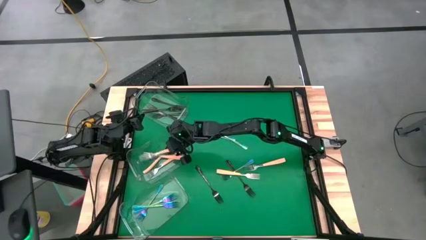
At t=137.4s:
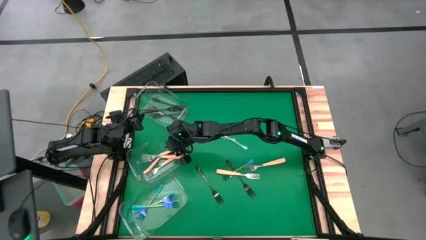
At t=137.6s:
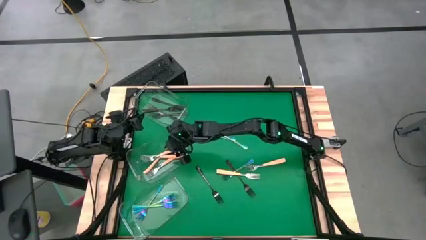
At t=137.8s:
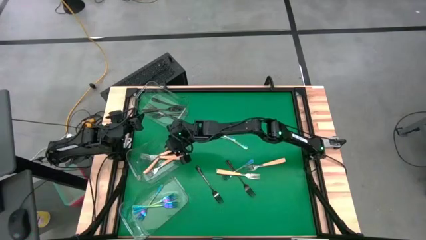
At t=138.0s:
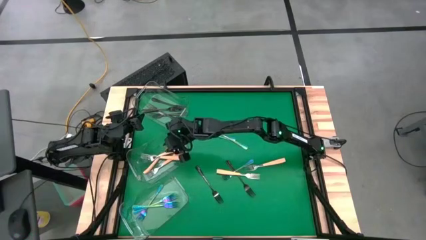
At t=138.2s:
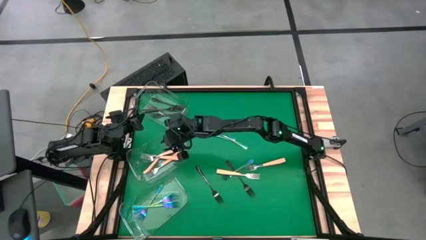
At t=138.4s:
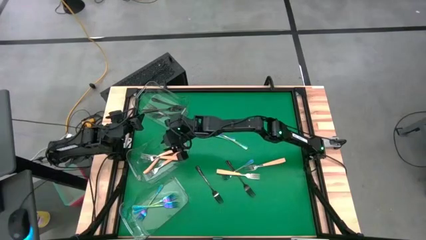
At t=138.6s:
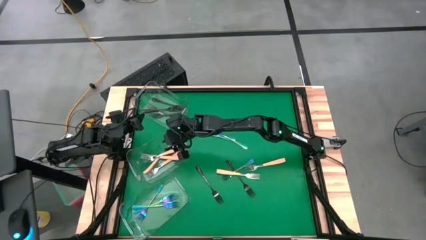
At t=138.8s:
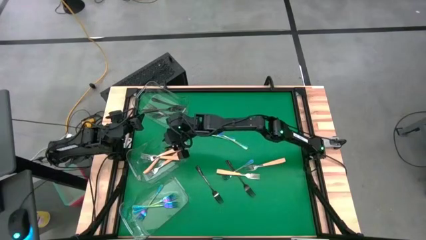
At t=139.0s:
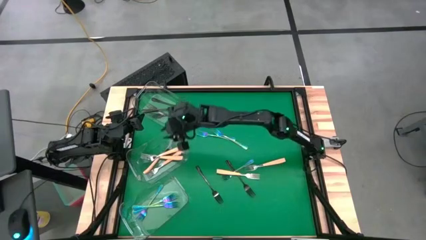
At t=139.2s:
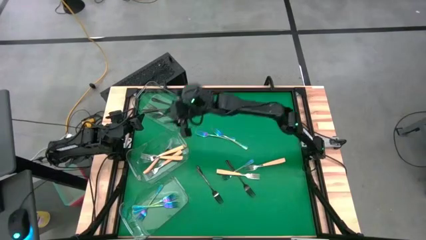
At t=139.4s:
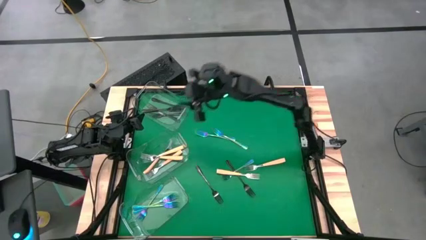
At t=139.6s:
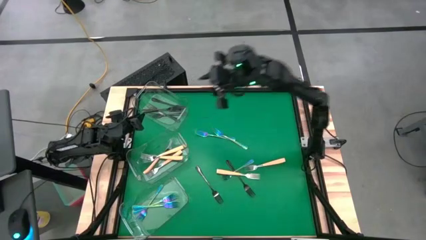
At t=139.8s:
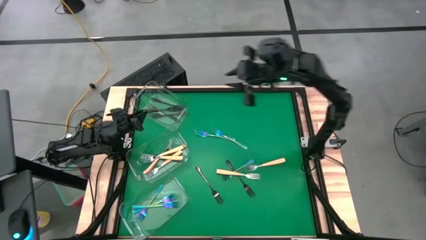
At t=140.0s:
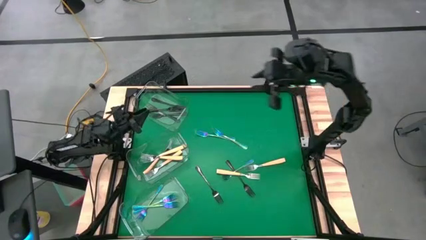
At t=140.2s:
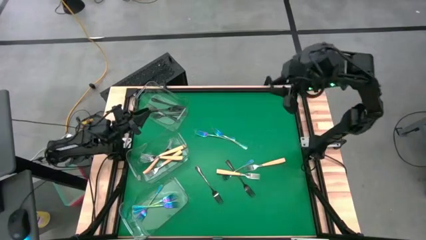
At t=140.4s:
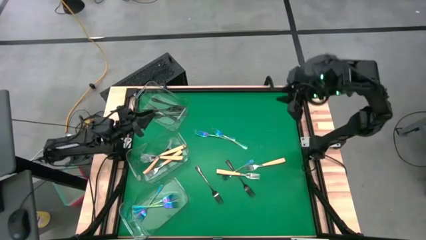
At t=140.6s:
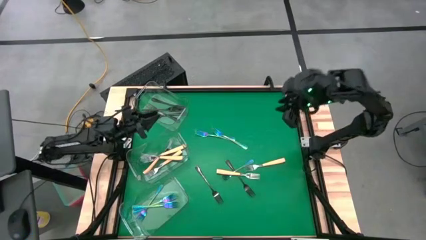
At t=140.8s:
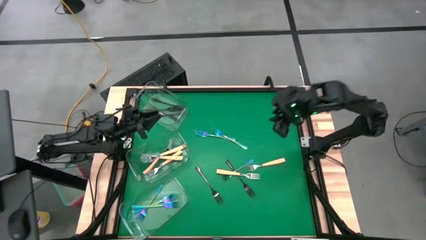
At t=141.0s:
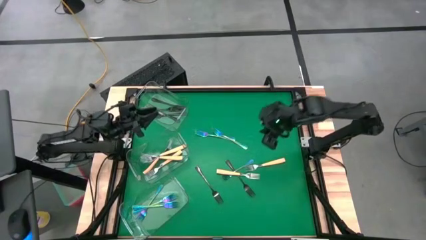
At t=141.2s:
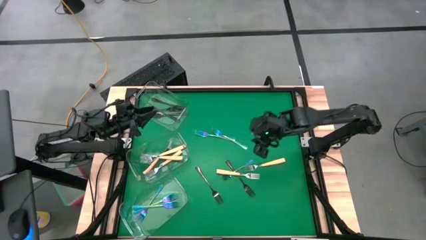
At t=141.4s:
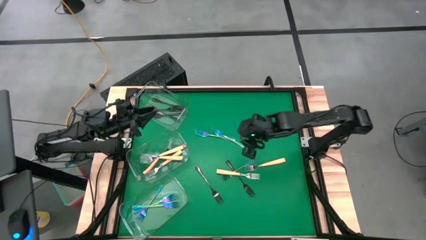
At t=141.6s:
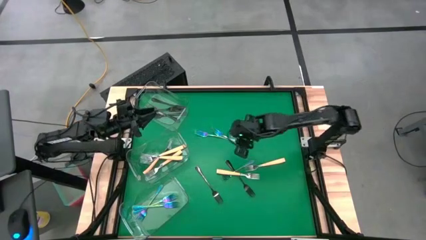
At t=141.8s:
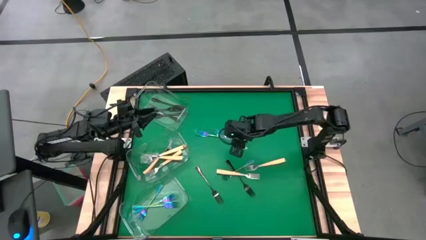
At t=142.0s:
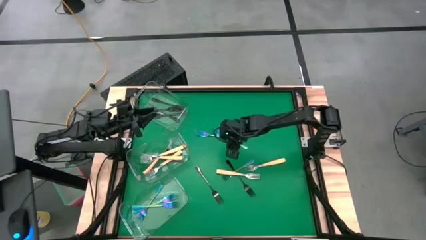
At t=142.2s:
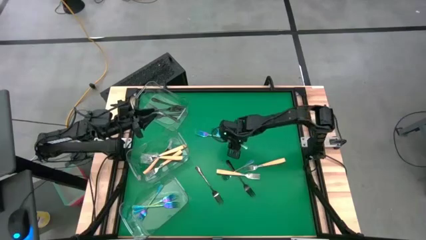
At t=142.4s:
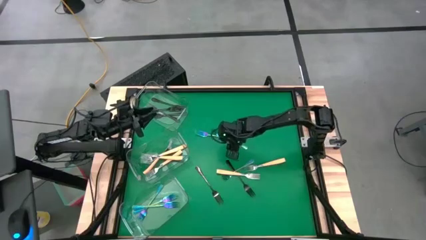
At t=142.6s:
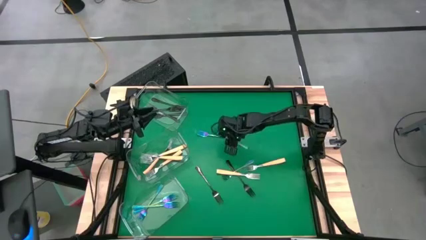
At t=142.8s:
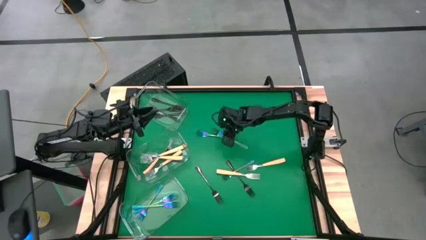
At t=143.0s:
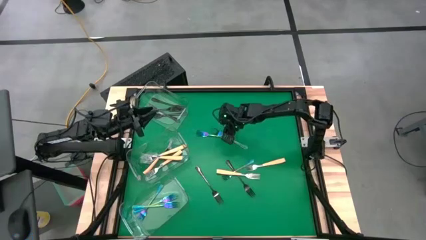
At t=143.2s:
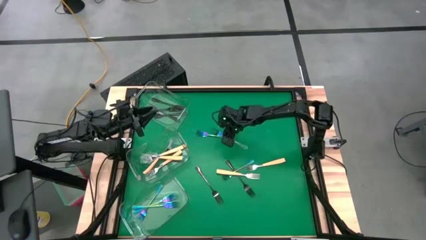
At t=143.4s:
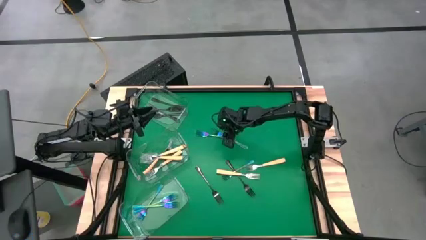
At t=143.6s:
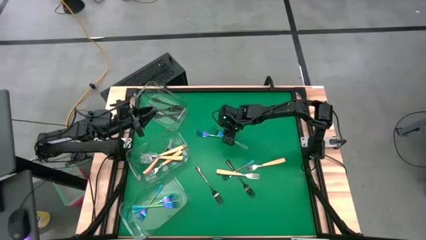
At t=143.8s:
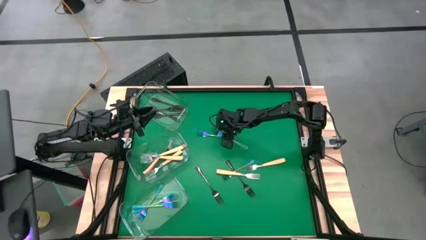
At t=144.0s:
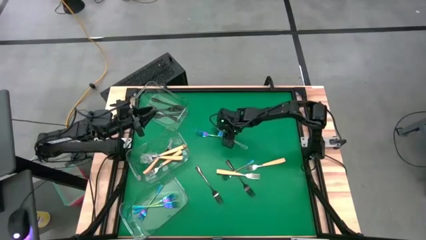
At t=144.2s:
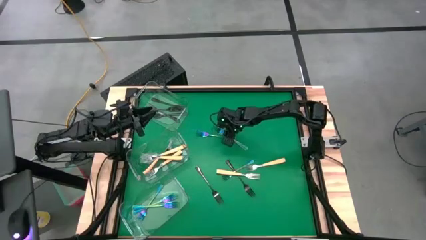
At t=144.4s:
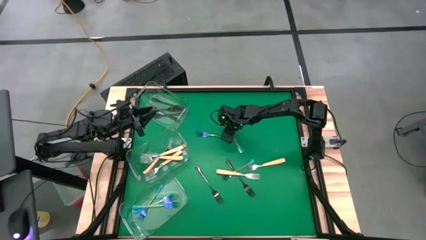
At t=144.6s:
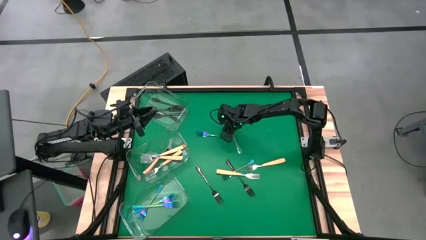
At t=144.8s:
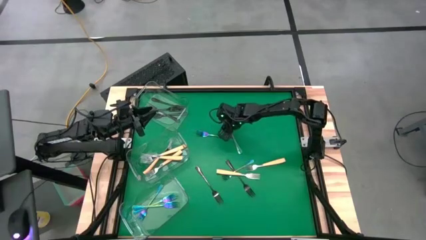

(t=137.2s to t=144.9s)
Task: Sort silverware by color (type)
Put the blue fork into the bottom transparent bin

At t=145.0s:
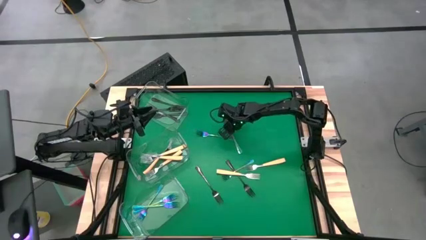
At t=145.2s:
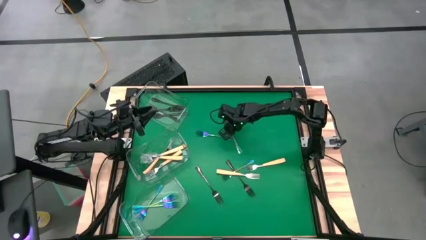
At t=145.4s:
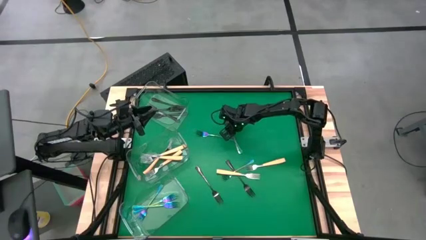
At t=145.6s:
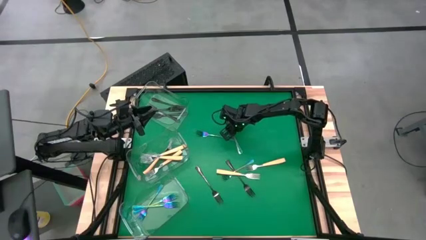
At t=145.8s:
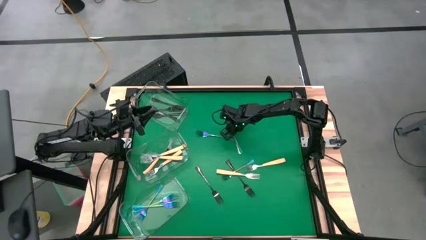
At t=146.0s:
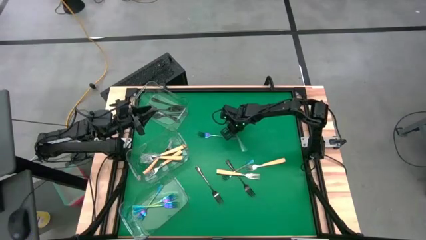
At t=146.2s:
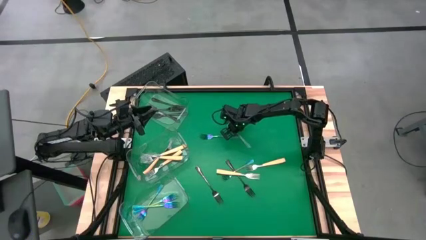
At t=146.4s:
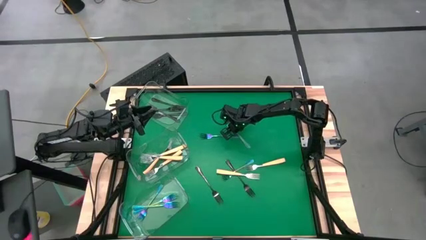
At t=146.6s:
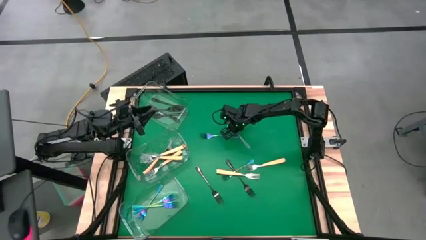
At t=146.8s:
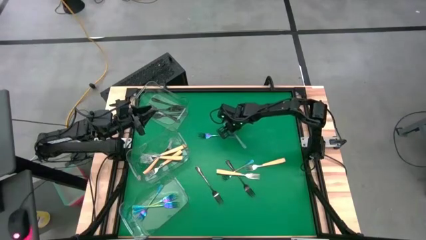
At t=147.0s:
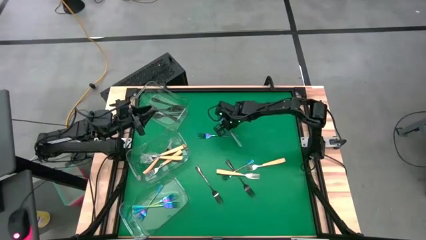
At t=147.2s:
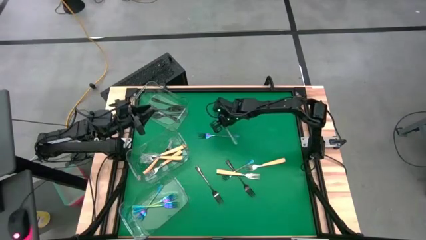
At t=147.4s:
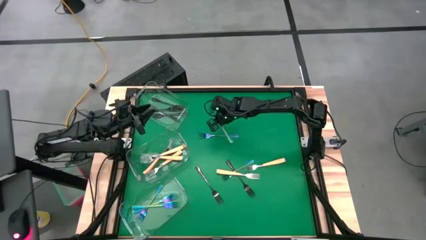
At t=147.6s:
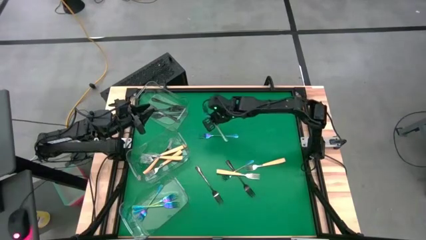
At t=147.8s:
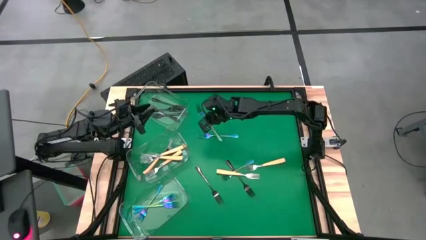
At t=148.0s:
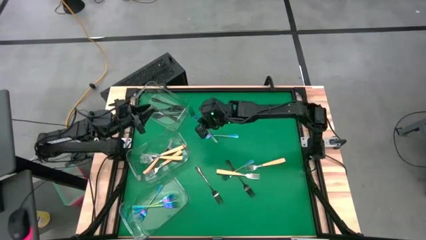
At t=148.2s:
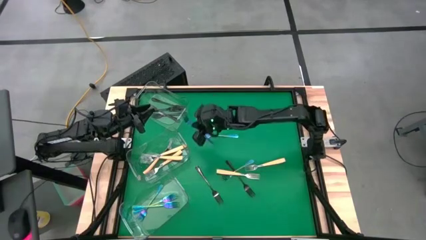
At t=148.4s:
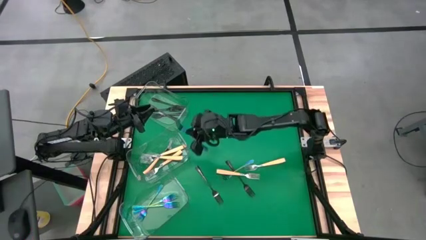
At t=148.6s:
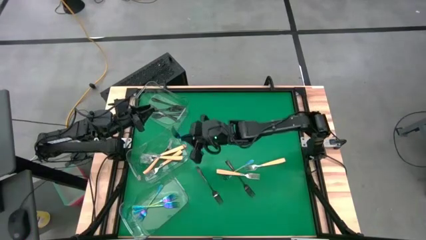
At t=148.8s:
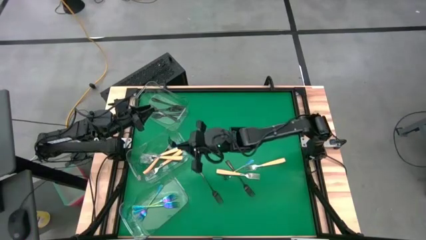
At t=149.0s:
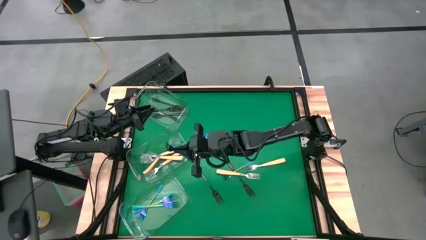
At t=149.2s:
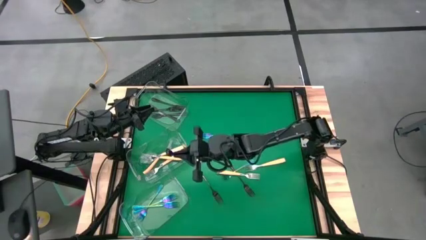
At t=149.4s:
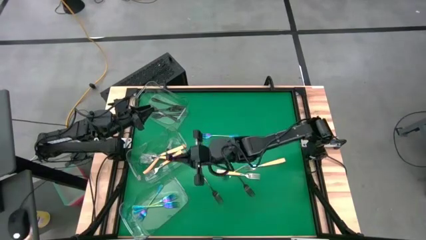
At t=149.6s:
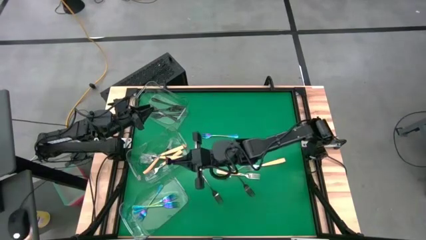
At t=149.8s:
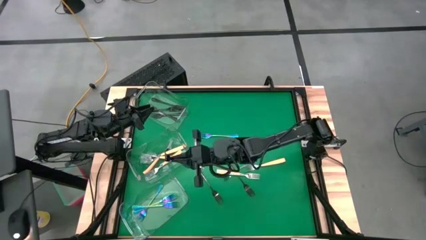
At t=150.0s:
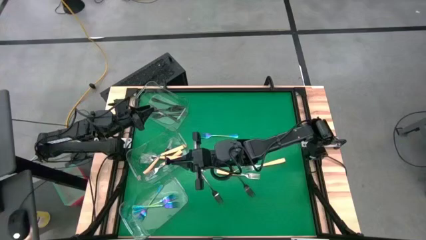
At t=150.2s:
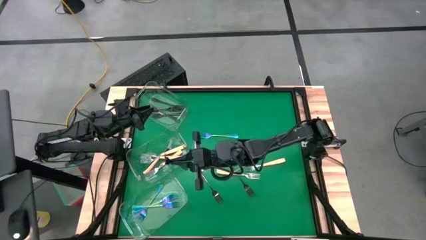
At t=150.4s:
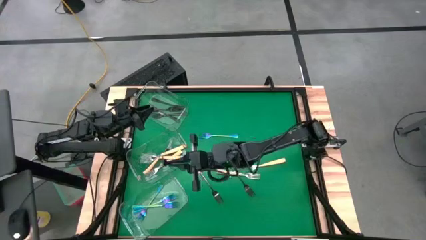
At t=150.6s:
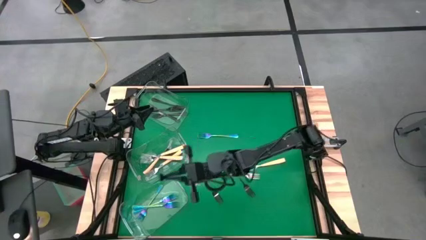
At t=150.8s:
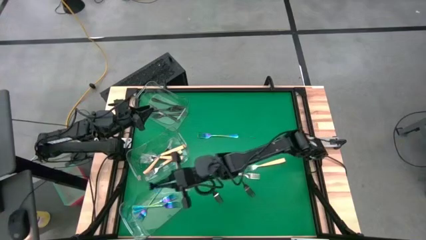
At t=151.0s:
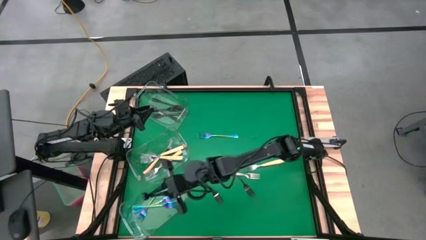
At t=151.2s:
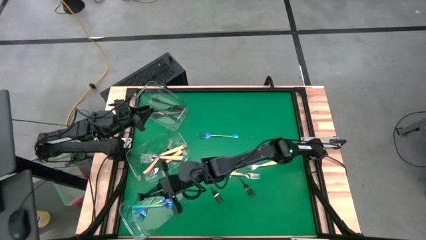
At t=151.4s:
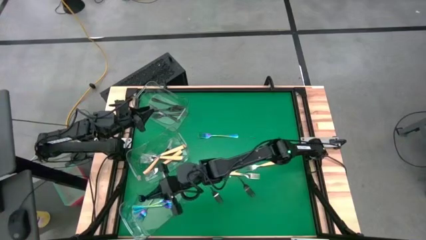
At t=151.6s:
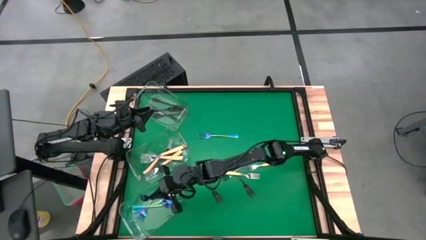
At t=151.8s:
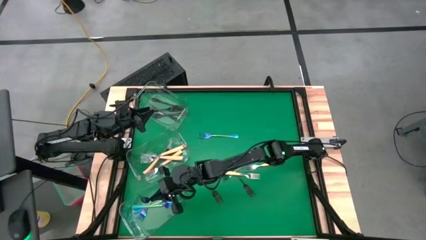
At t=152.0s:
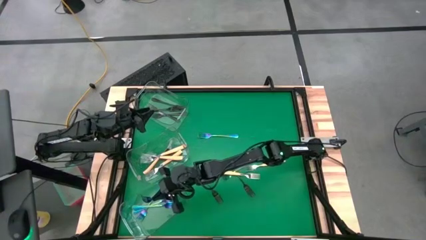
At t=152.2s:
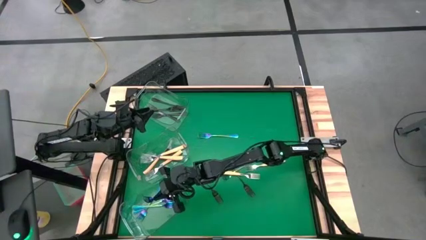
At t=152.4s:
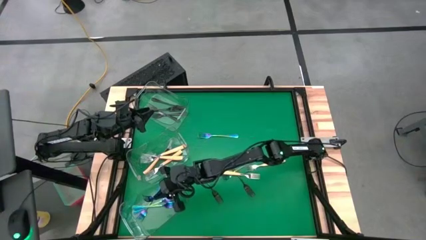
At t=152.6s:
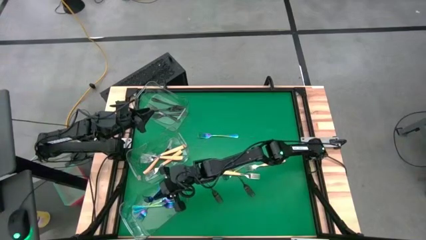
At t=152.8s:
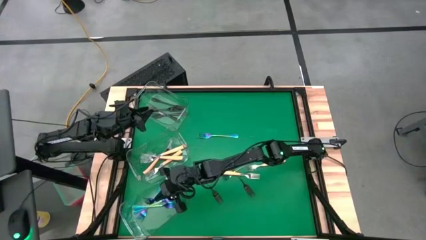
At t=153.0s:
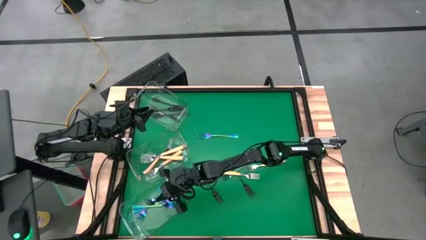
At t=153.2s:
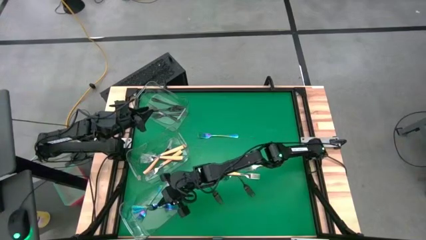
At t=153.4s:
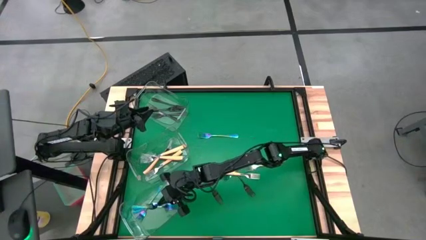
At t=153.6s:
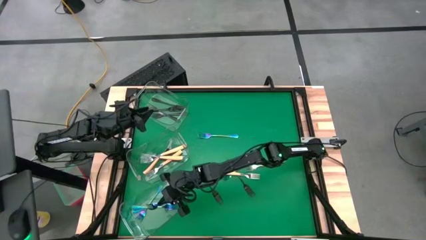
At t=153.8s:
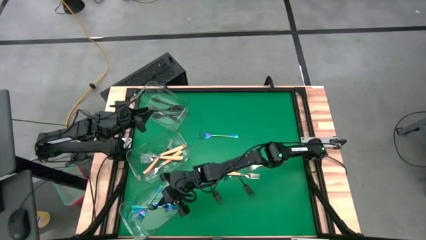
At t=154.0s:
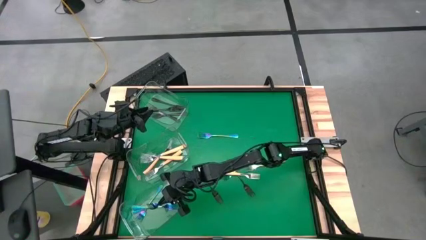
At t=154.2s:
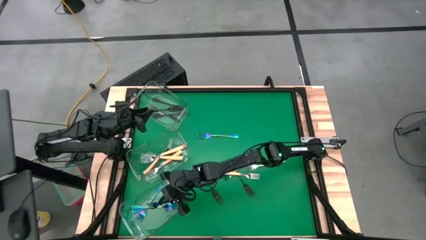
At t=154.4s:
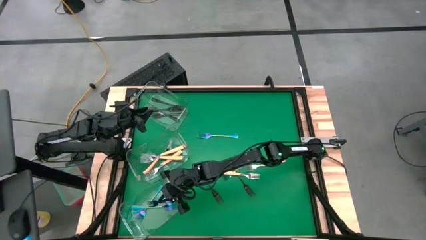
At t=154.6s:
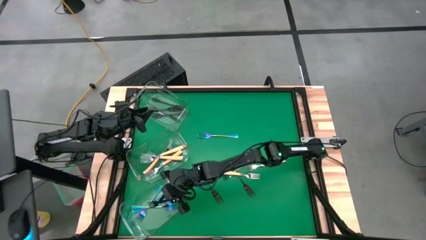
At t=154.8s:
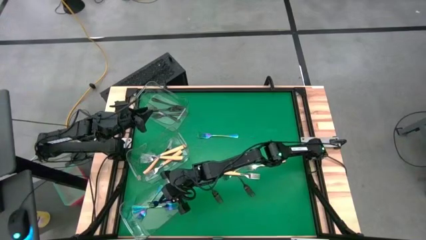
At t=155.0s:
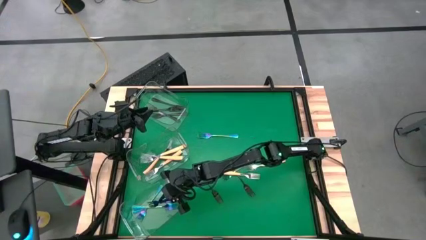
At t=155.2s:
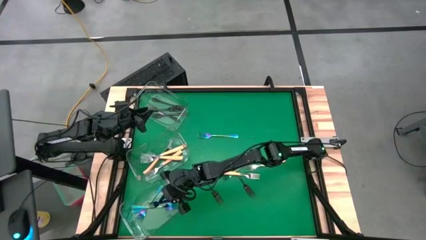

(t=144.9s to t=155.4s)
Put the blue fork into the bottom transparent bin
